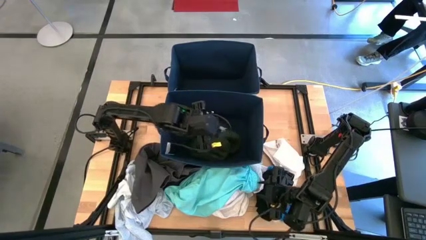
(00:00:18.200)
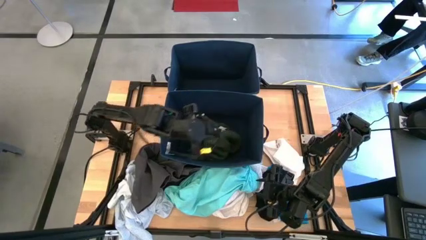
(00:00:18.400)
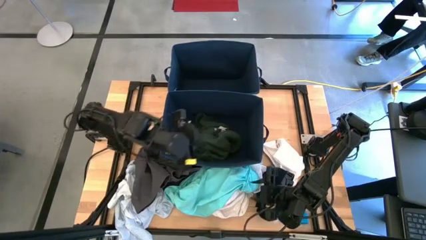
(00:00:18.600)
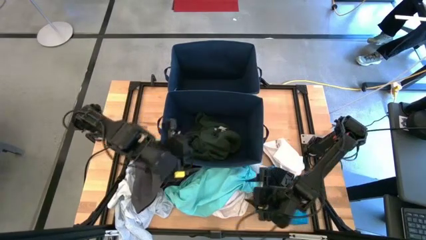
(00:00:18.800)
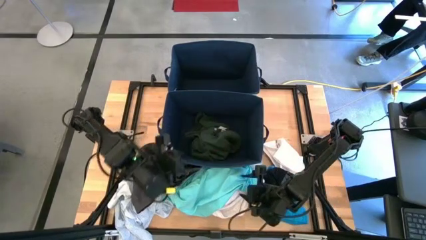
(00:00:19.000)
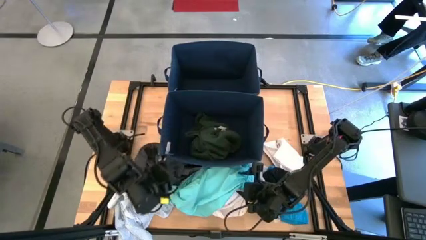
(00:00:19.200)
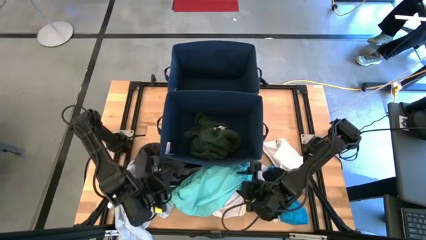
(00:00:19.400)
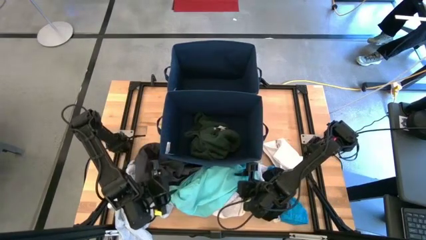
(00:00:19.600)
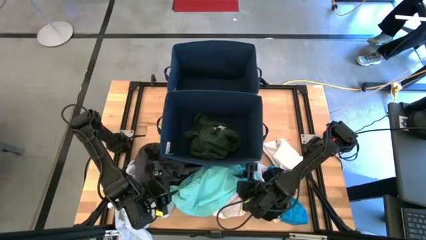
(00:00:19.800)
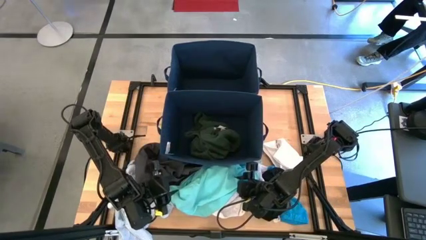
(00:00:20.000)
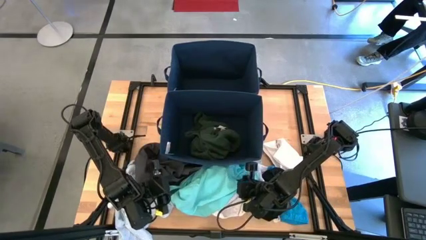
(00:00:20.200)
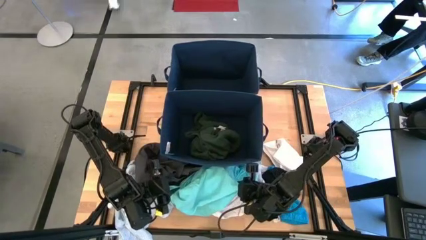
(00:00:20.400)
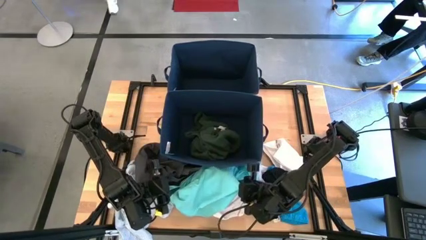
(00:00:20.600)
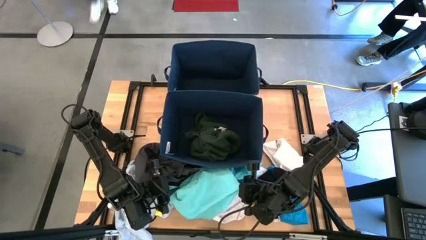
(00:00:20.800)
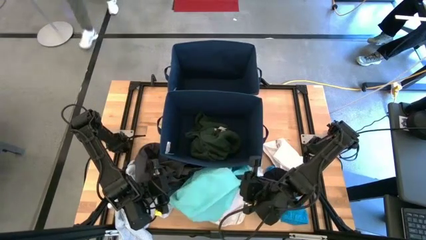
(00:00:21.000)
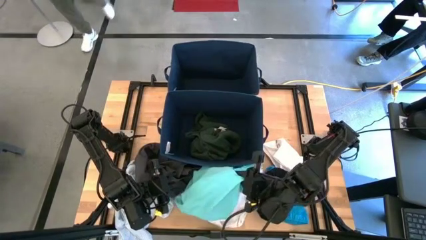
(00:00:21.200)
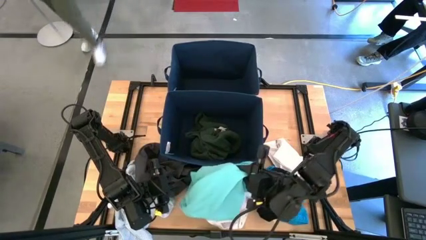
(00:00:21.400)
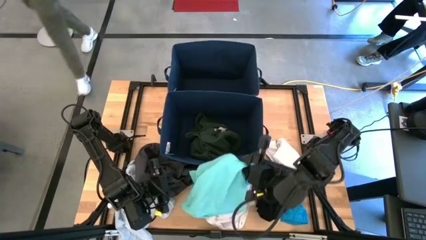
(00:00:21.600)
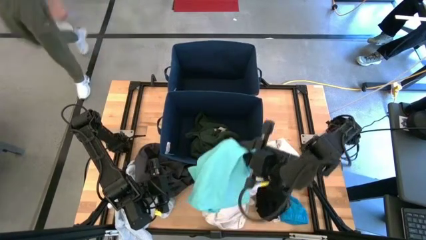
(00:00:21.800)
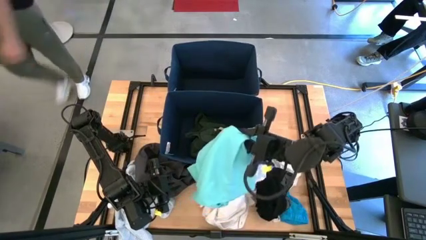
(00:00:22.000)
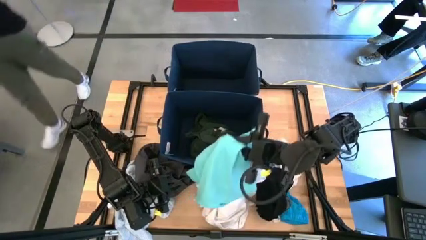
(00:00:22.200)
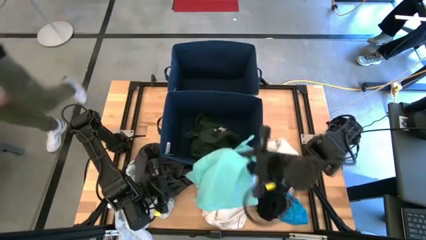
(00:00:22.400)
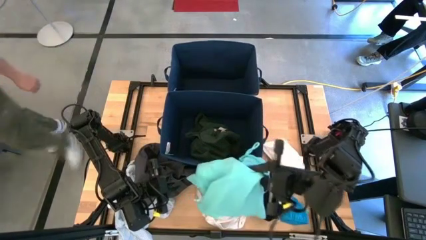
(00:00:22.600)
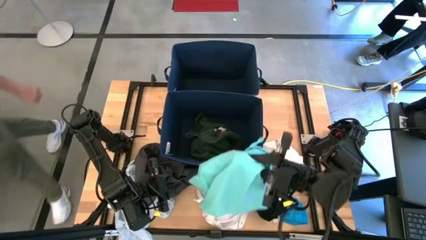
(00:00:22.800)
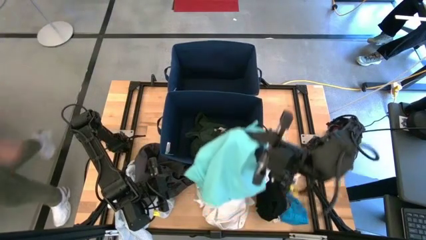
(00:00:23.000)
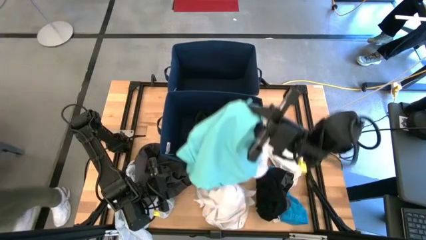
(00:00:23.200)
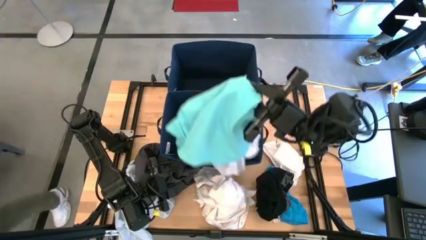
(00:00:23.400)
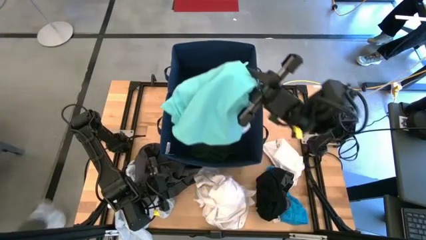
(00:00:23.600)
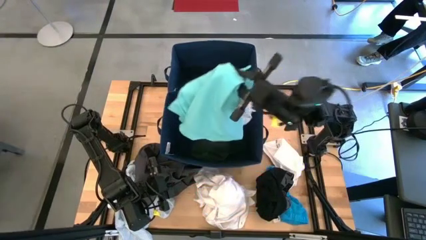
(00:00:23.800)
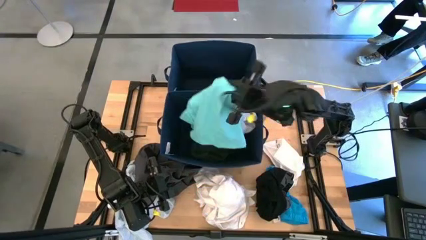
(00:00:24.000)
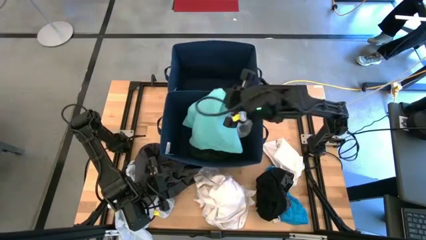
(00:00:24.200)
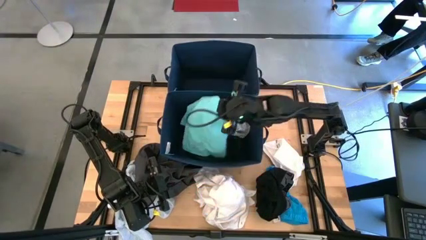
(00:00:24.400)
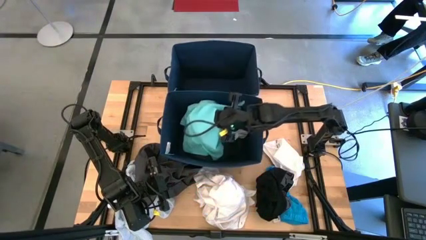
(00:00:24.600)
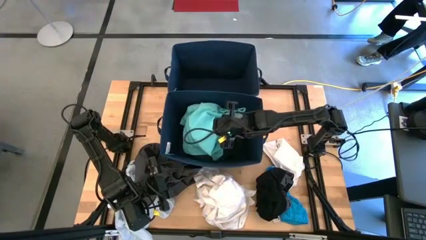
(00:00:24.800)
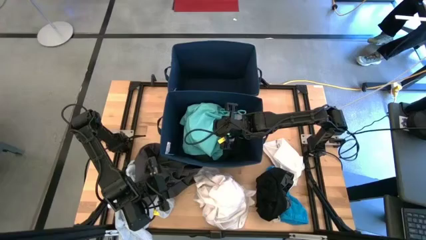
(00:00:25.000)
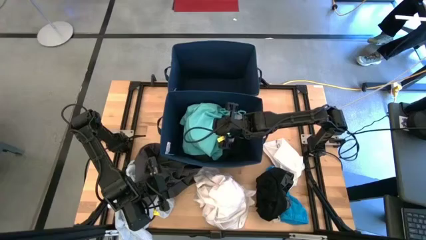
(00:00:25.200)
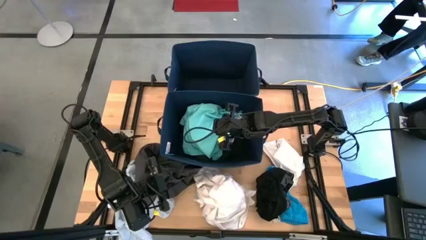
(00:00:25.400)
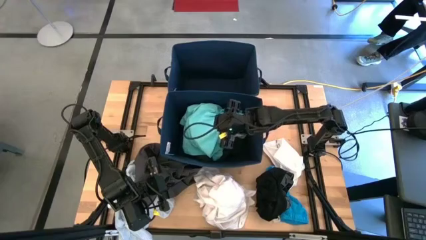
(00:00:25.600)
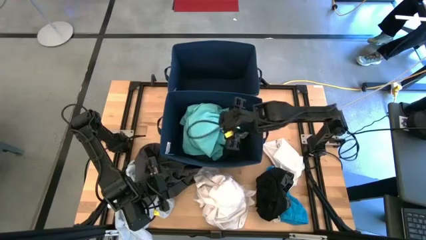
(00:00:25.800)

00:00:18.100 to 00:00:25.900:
Task: Sort clothes
Put the light blue short pants into the bottom blue laundry bin

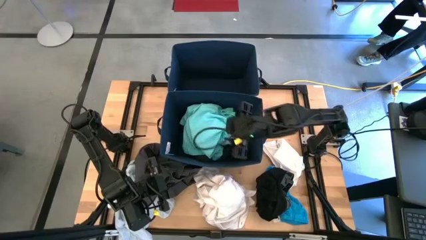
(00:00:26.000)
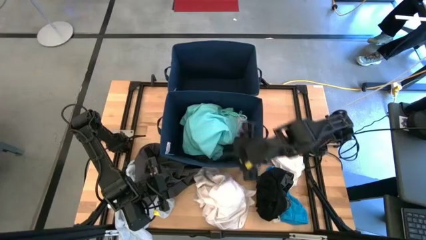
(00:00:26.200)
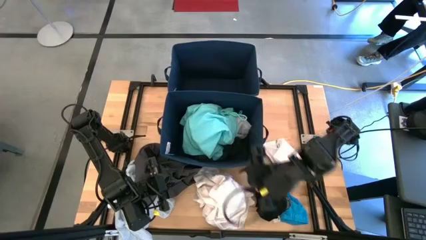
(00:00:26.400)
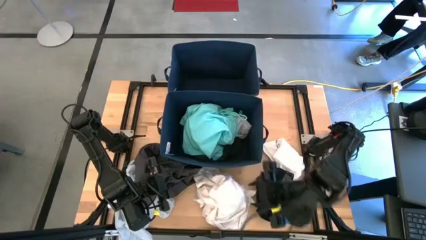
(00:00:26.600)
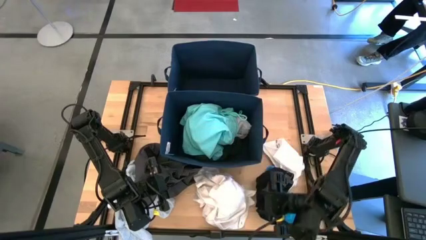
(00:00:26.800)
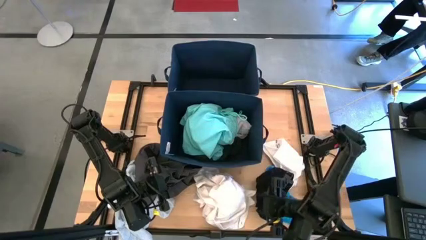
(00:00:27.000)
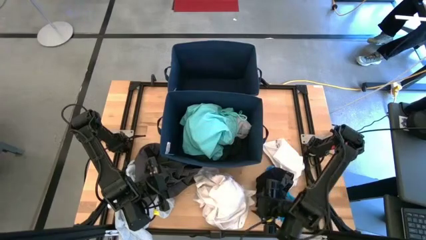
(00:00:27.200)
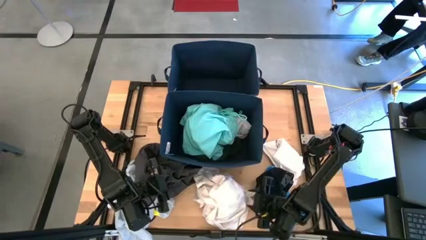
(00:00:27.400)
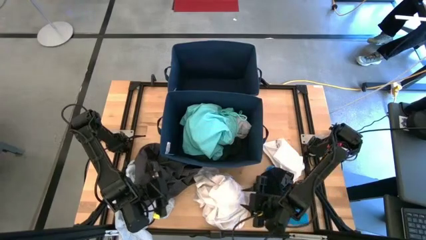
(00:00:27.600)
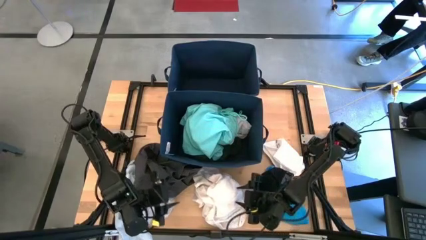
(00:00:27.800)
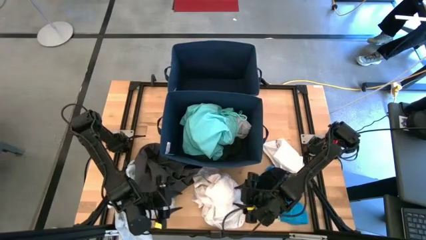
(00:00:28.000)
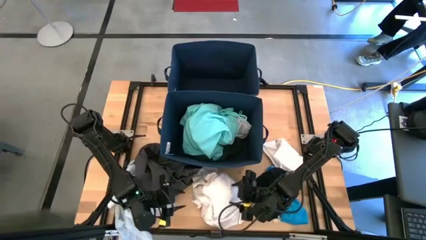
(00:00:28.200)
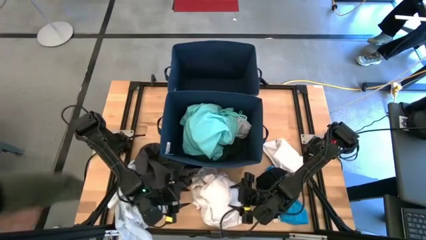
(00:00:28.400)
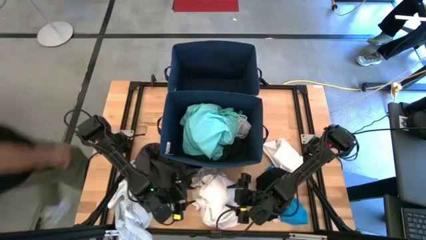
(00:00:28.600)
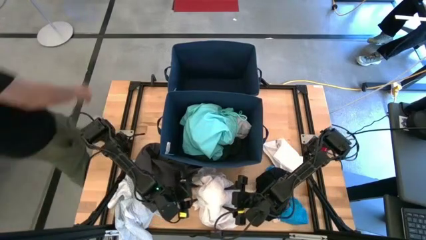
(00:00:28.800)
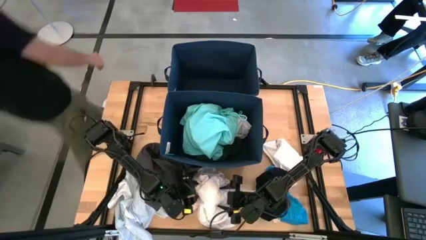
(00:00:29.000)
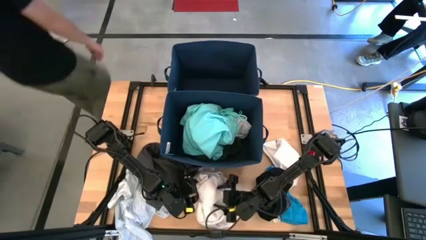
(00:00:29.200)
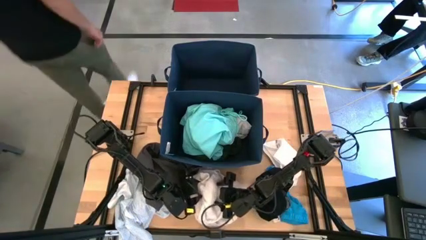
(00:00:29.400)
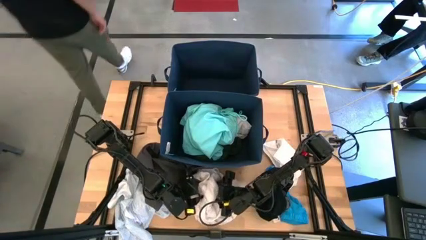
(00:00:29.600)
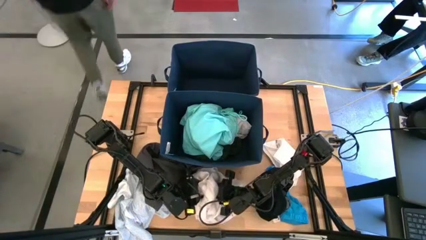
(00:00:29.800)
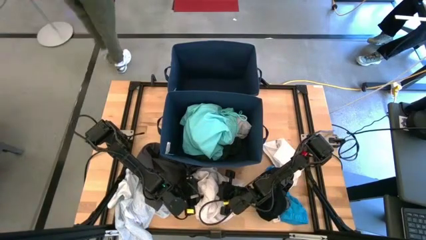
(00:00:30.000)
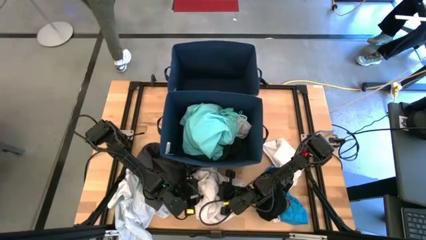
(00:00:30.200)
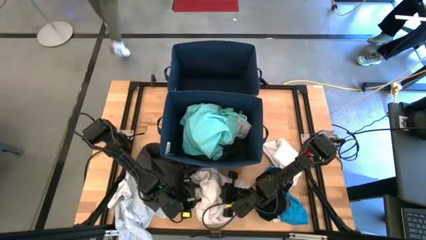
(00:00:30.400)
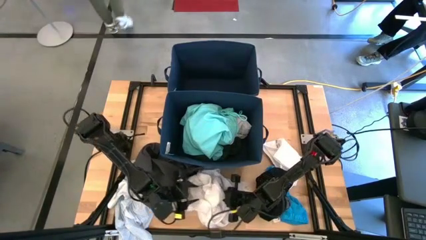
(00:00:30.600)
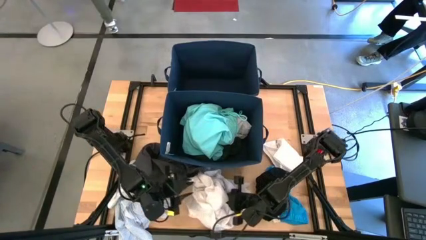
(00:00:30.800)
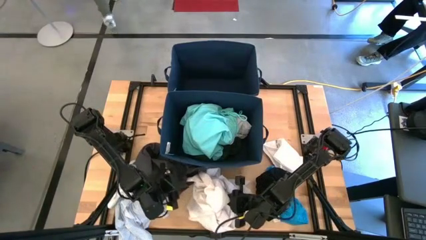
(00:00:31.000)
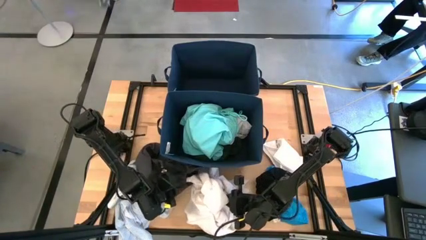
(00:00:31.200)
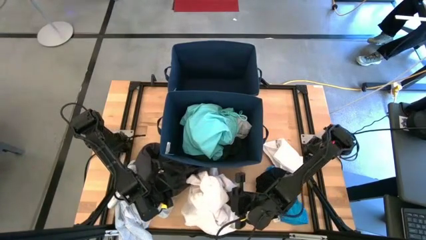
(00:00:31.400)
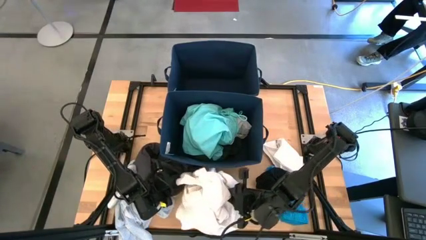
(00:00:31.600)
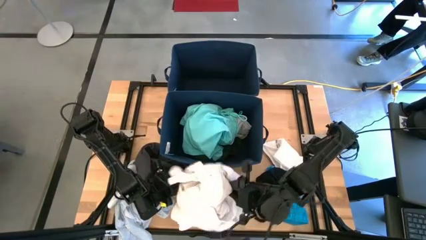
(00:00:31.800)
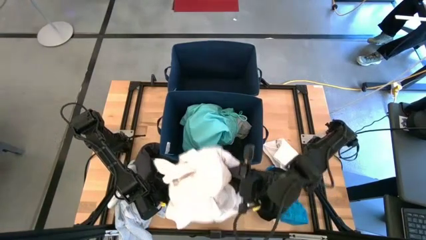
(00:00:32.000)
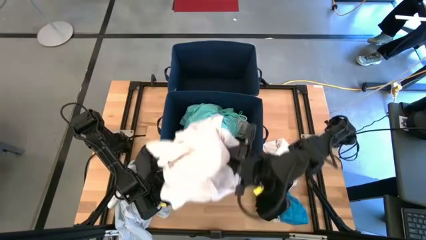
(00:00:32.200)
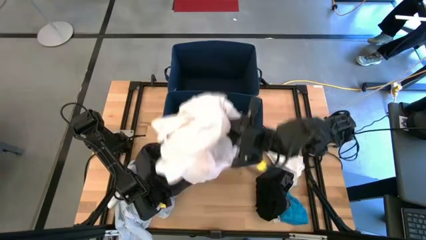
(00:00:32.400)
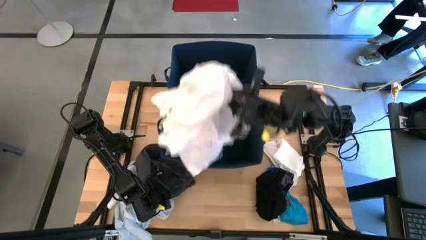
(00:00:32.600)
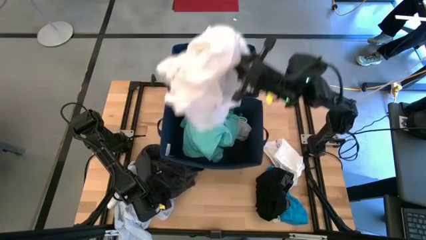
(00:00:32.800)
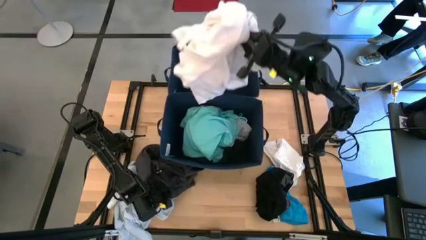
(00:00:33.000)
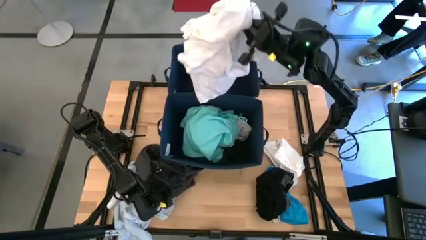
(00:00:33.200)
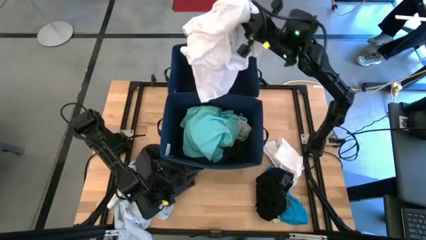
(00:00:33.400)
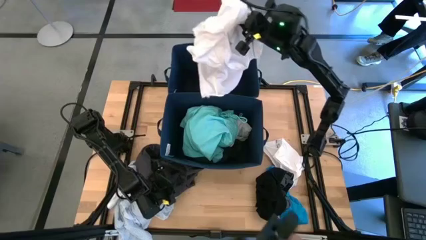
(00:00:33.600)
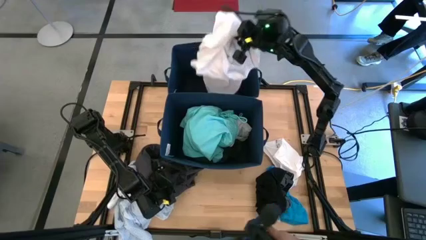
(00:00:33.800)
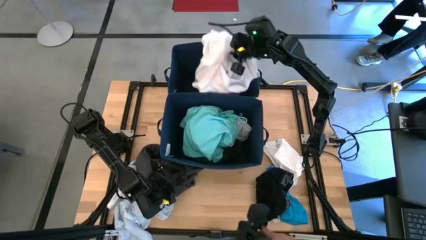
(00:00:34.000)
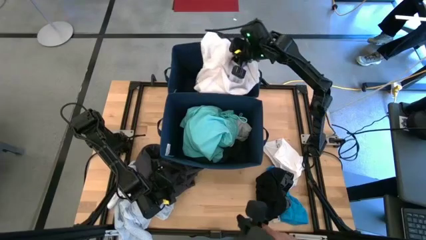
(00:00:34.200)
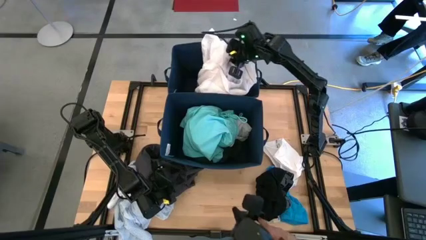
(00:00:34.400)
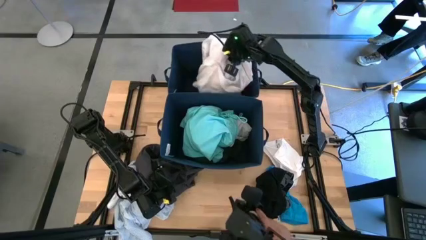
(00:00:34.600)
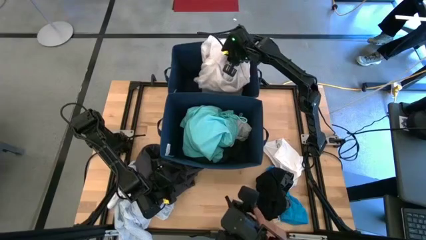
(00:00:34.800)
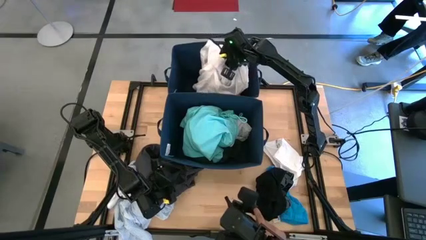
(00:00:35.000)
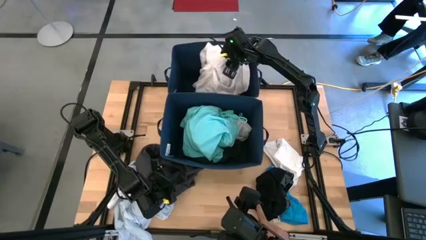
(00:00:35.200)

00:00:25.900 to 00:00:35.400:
Put the white shirt into the top blue laundry bin
